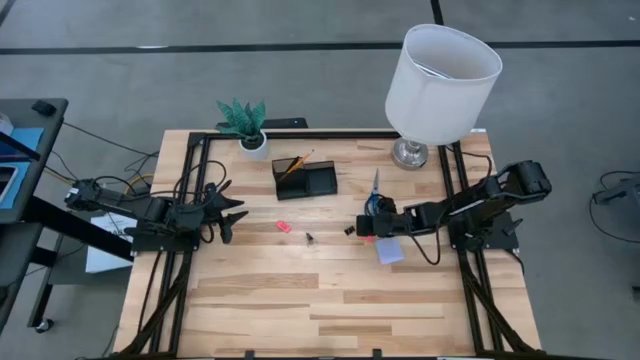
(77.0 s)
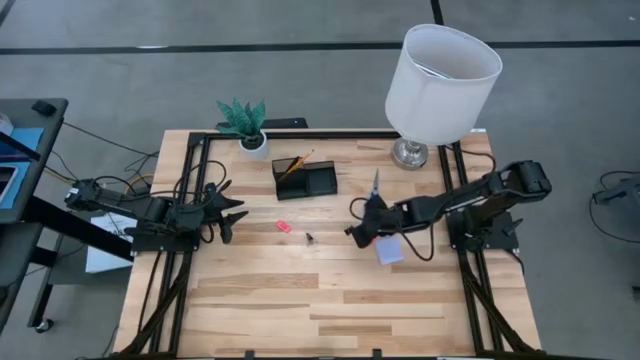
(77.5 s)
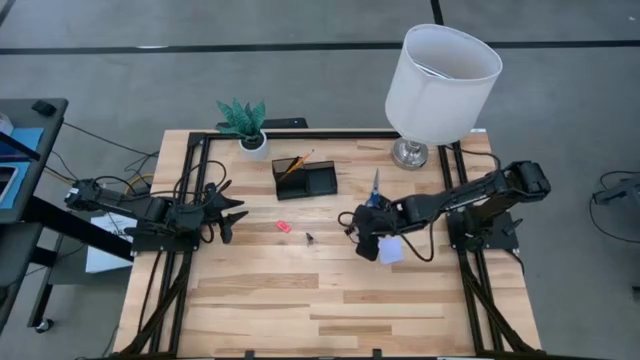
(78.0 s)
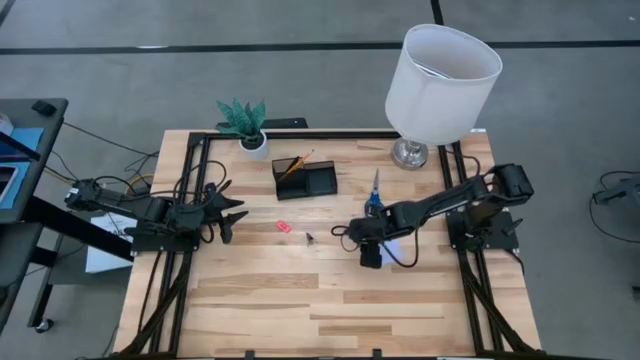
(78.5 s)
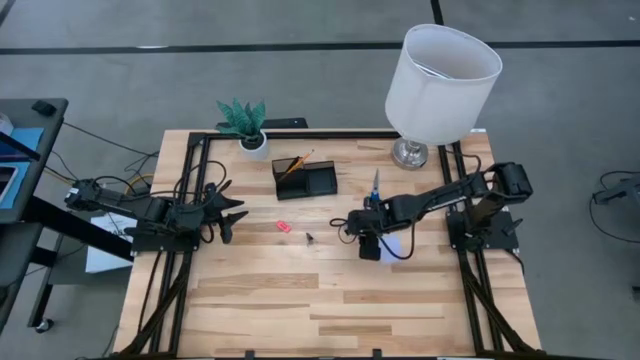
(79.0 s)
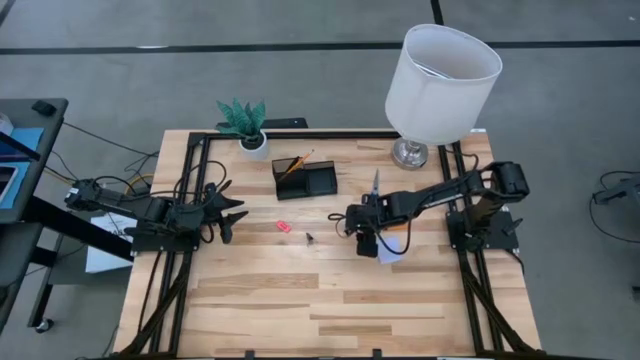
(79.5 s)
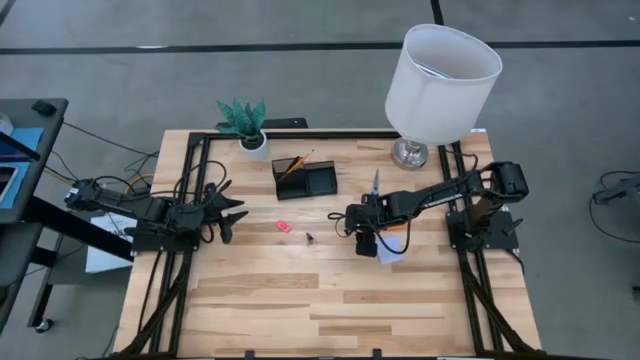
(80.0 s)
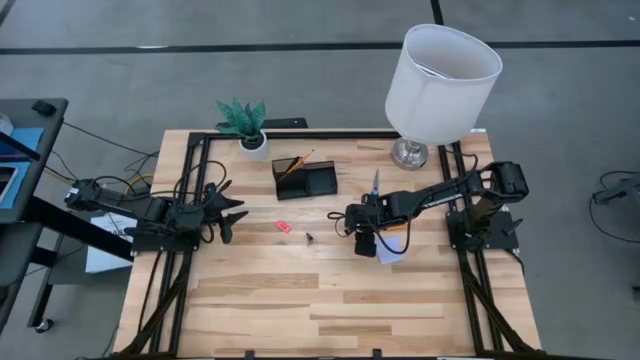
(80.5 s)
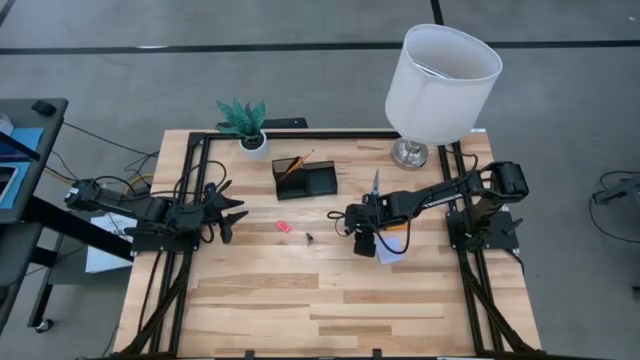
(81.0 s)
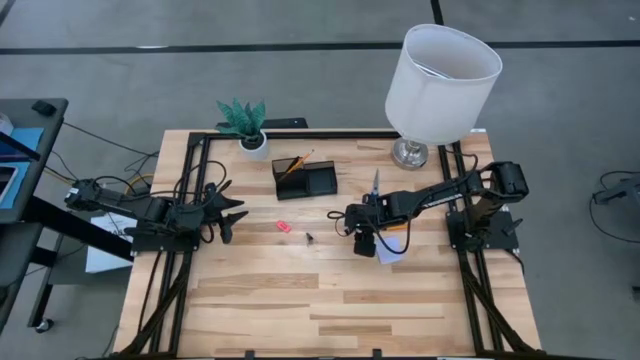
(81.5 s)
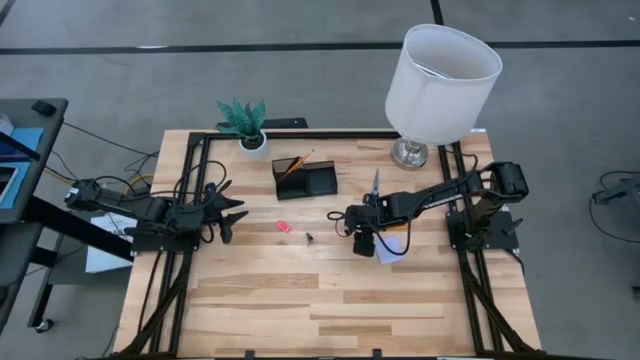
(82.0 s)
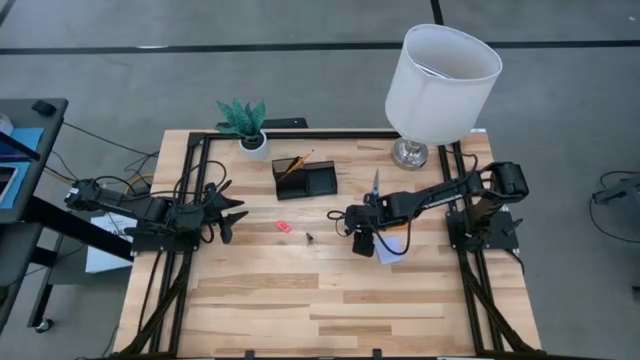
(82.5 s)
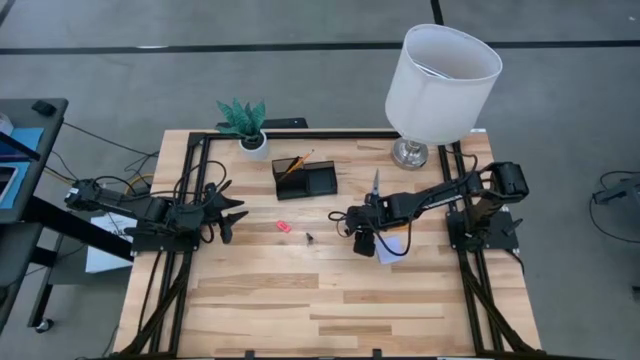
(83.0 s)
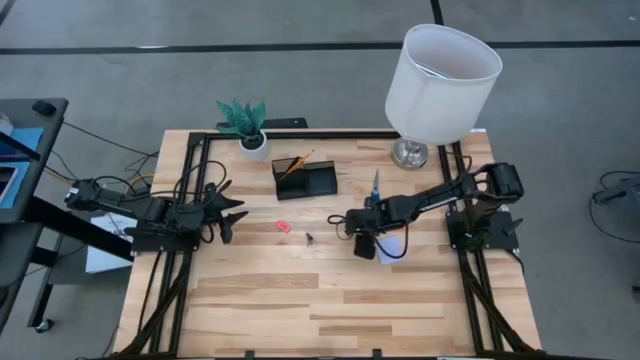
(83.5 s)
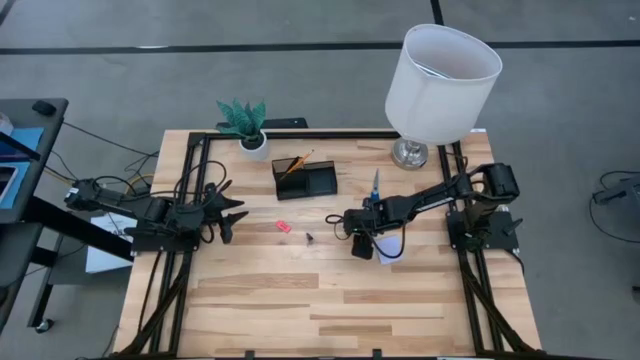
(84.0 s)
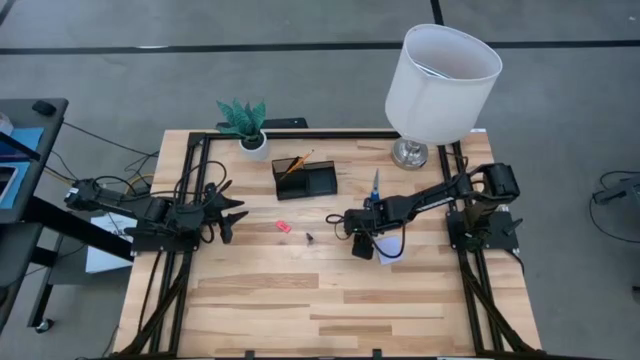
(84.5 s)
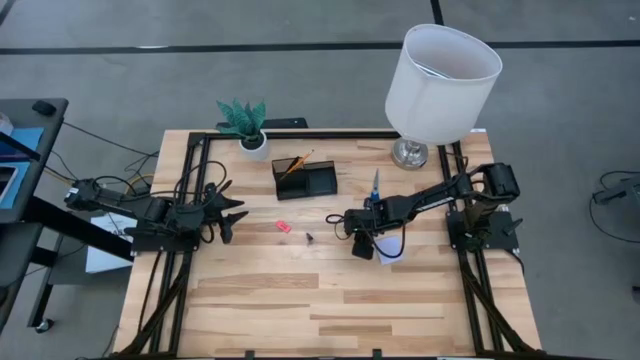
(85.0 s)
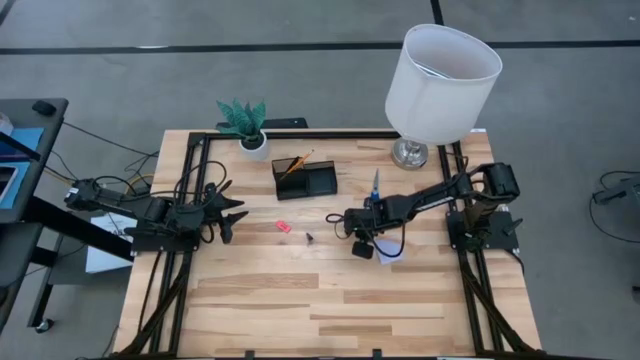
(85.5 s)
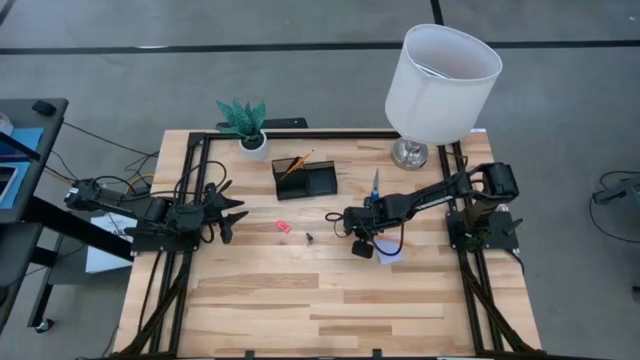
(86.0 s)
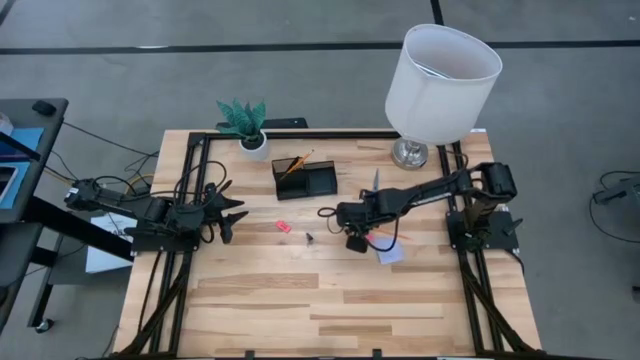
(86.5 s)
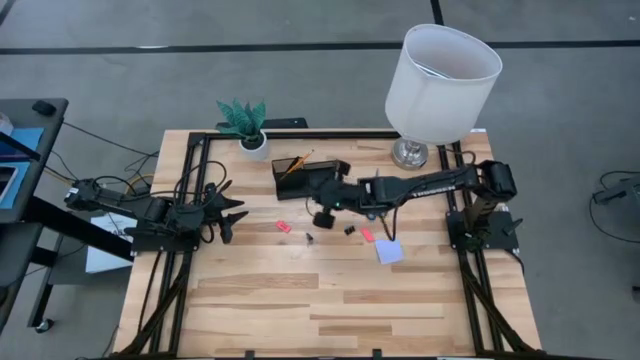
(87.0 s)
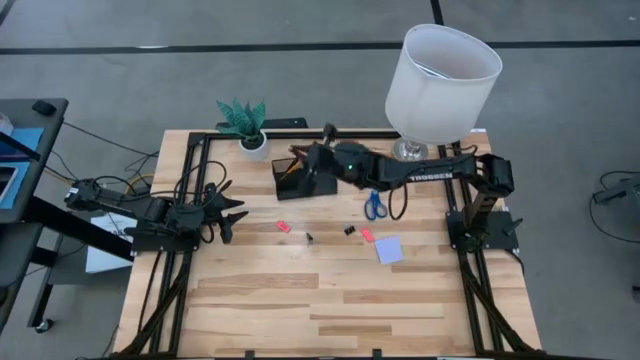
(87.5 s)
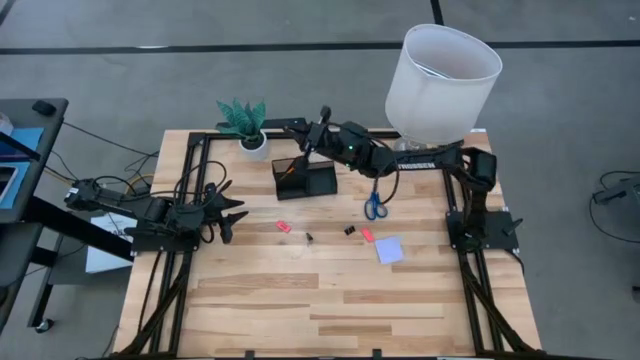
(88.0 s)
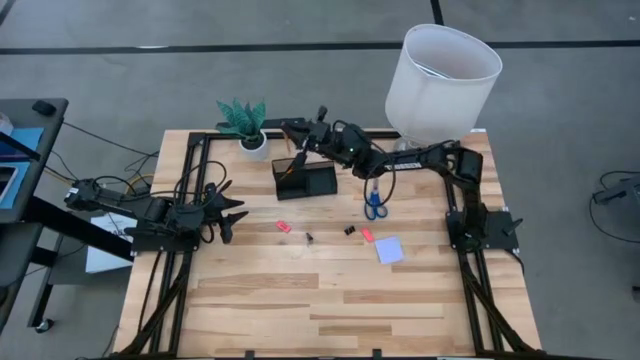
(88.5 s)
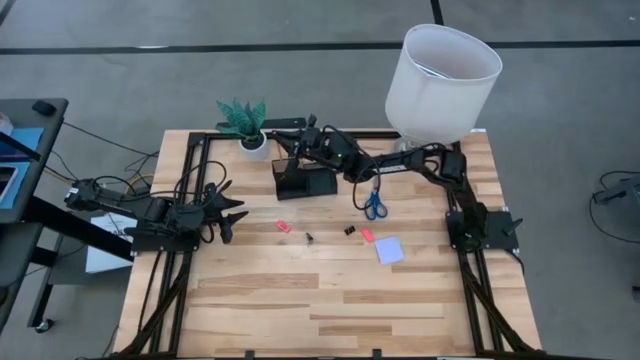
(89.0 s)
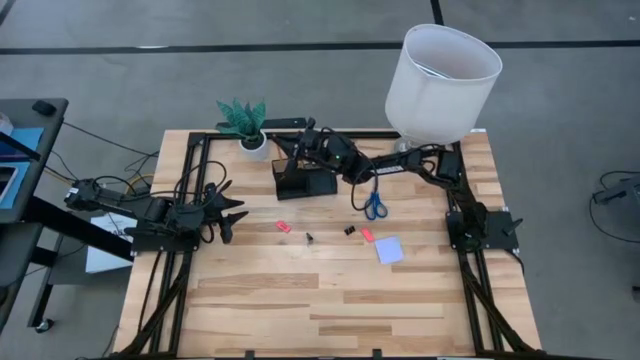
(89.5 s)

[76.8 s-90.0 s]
Task: Pick and place office supplies into organizer
Put the yellow pencil into the black desk organizer

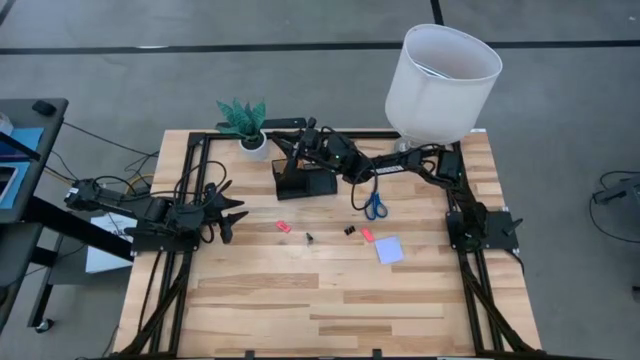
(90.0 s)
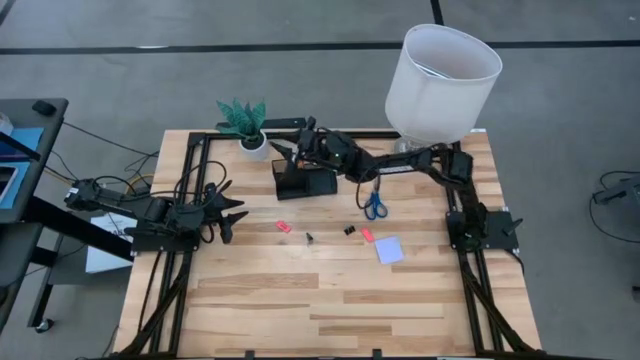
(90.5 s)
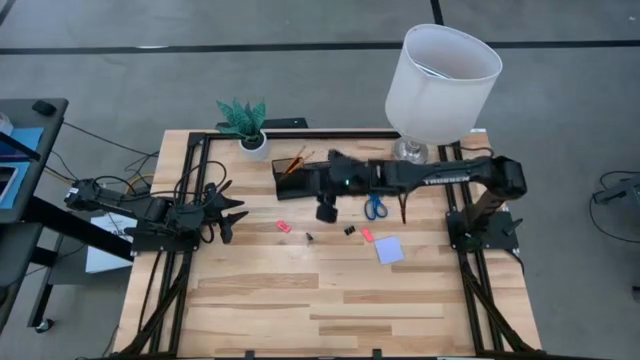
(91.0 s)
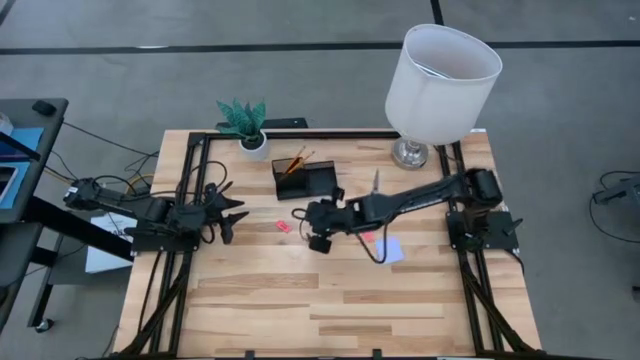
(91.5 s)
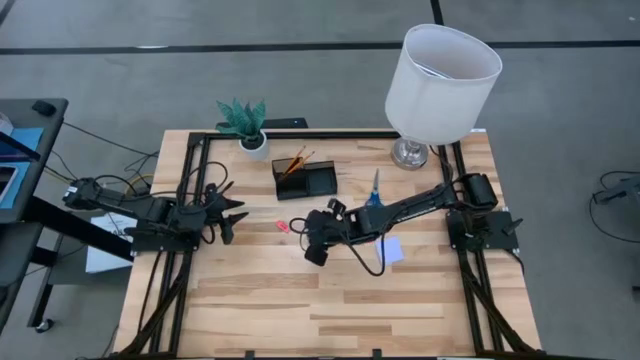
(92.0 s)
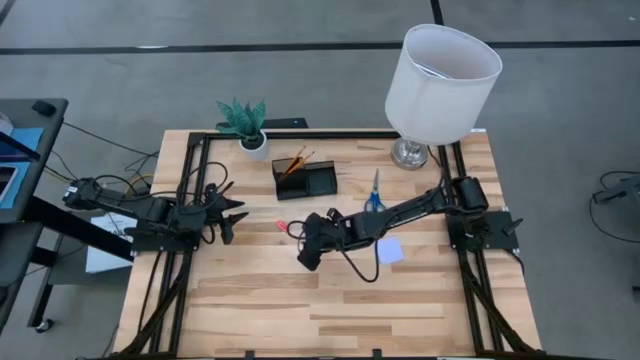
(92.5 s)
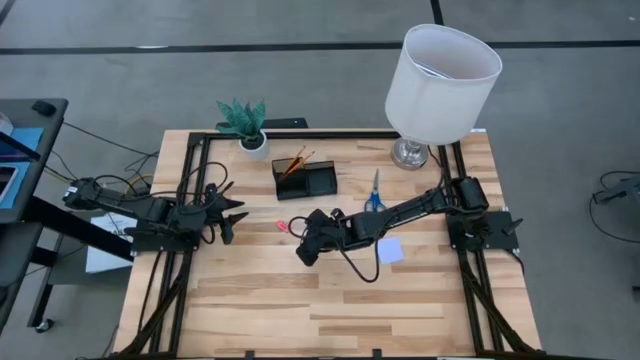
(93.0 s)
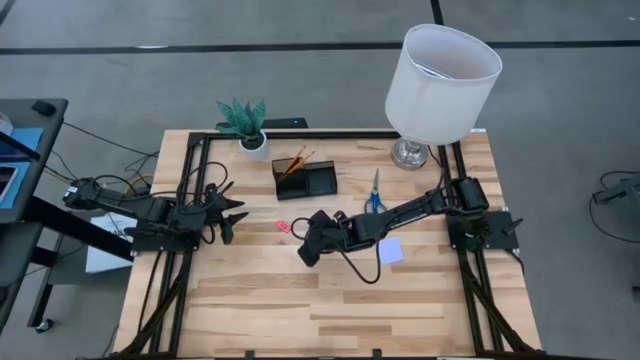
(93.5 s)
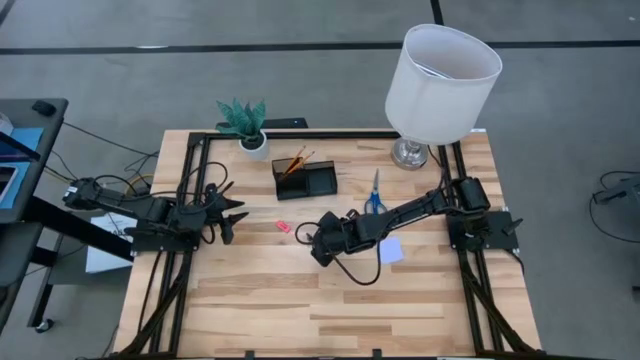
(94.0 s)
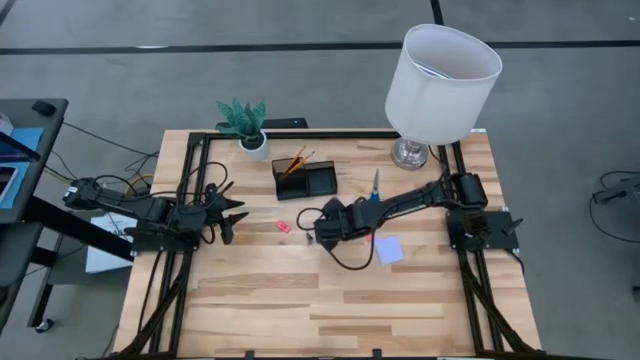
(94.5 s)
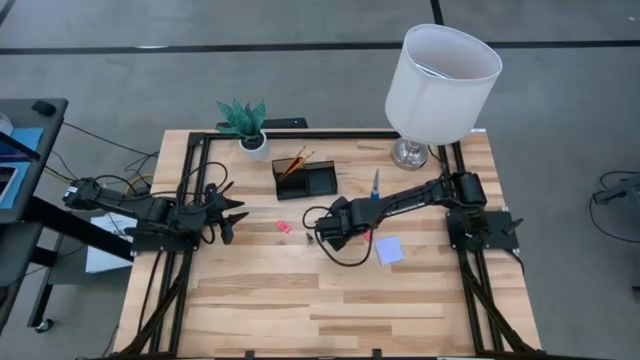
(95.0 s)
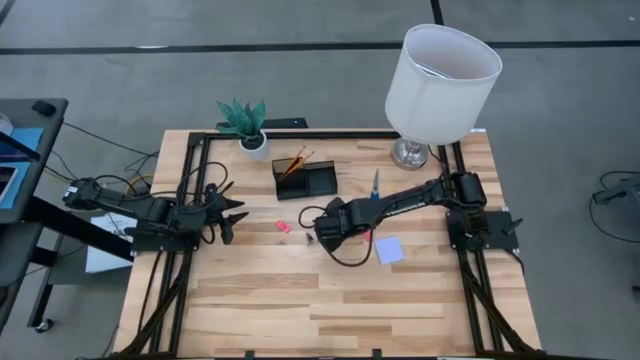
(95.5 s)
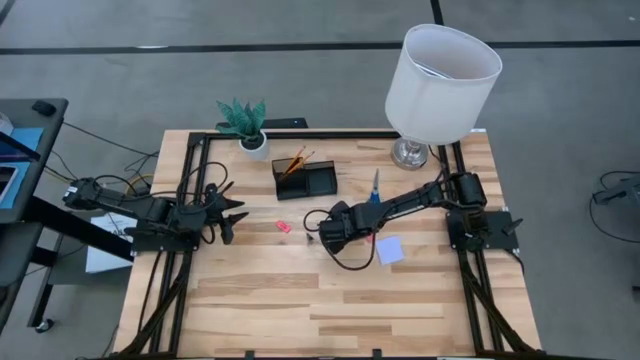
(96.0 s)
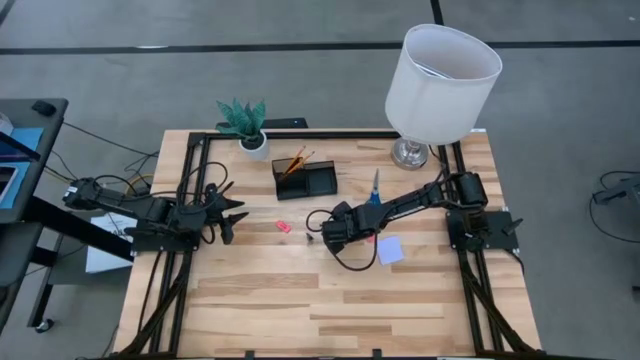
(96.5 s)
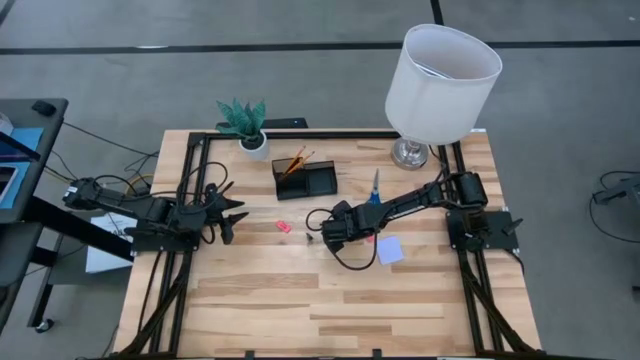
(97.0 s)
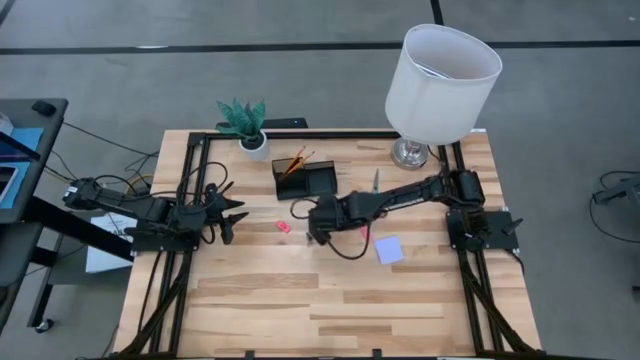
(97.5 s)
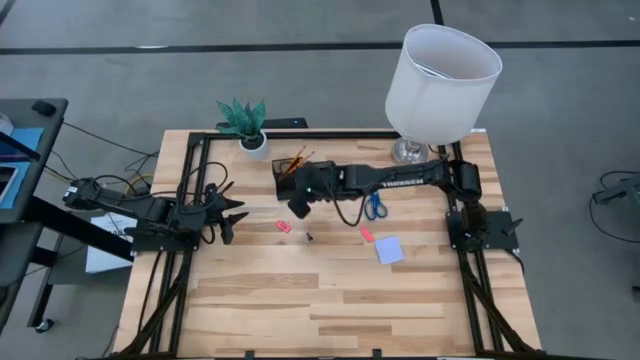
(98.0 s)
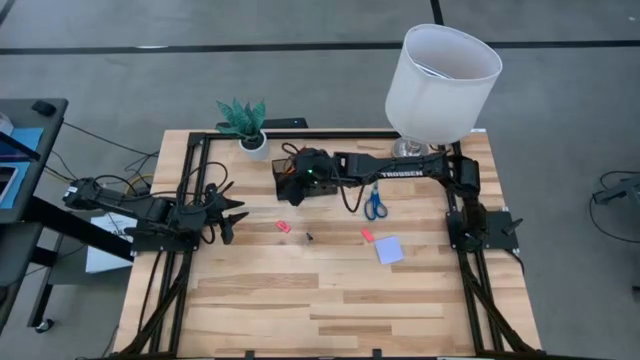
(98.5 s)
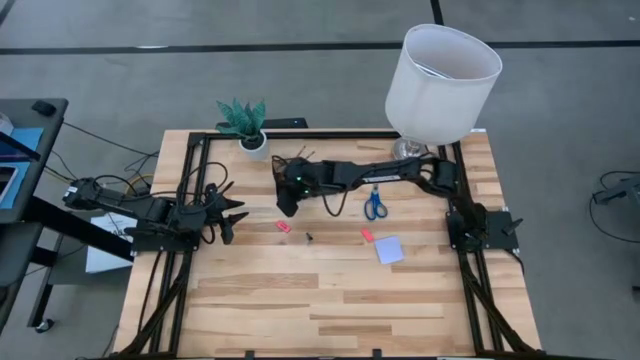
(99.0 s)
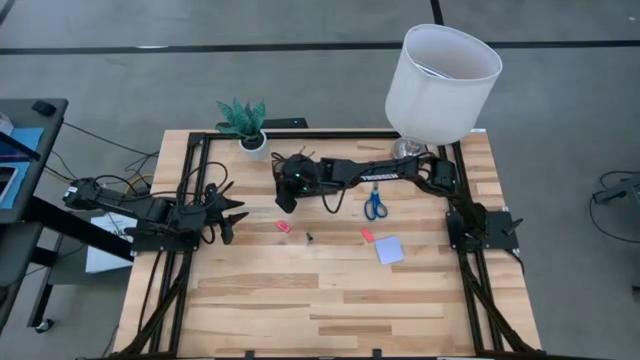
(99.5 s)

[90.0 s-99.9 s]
Put the right black binder clip into the black desk organizer
